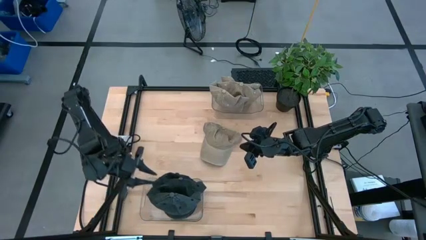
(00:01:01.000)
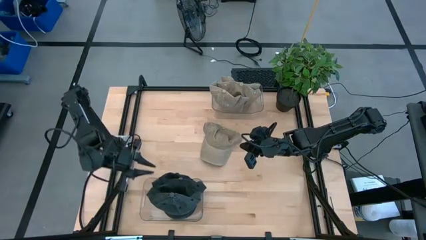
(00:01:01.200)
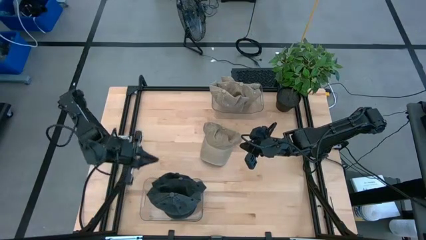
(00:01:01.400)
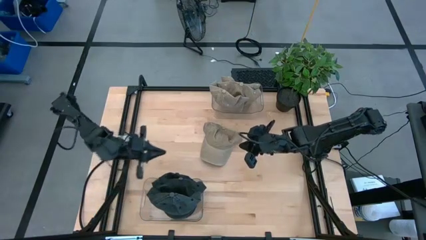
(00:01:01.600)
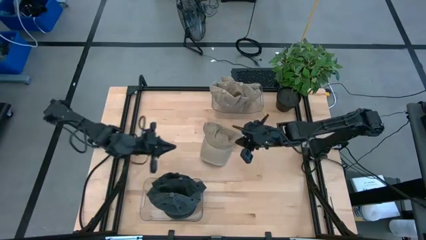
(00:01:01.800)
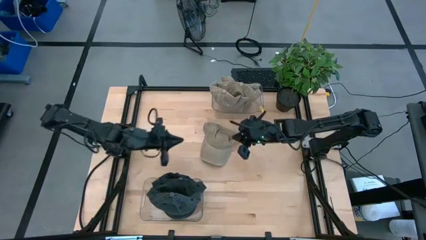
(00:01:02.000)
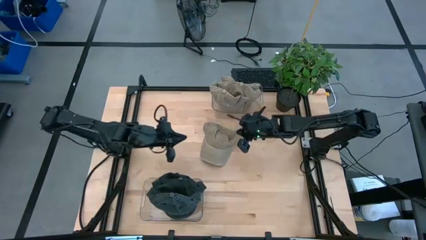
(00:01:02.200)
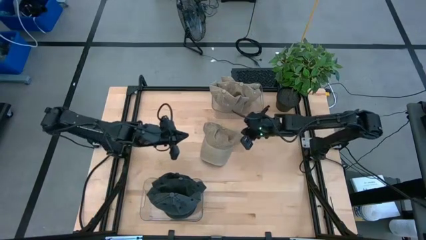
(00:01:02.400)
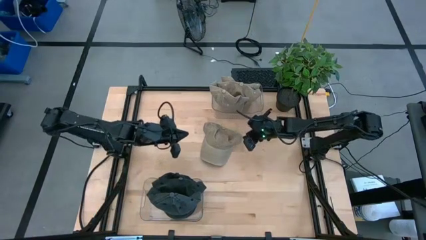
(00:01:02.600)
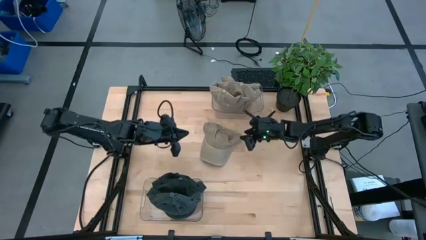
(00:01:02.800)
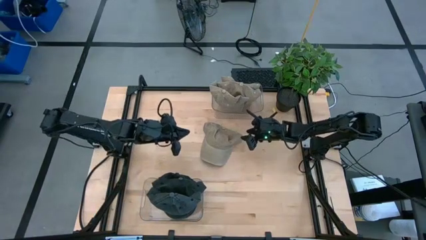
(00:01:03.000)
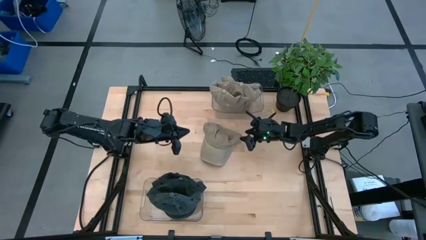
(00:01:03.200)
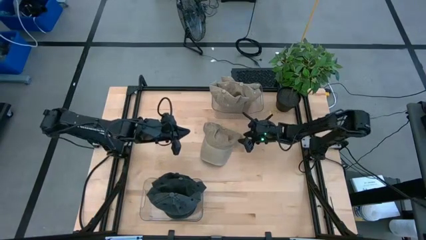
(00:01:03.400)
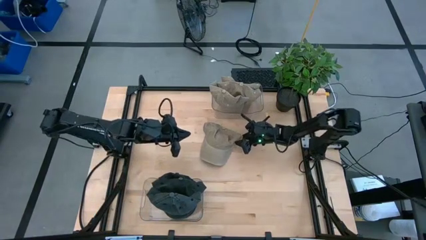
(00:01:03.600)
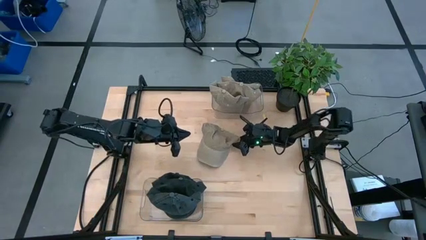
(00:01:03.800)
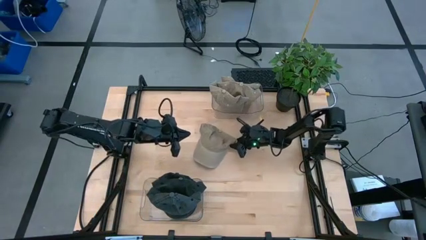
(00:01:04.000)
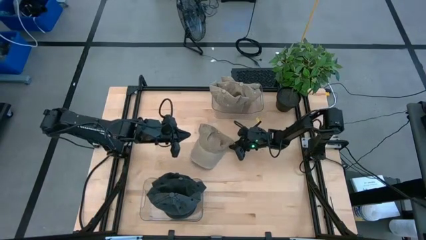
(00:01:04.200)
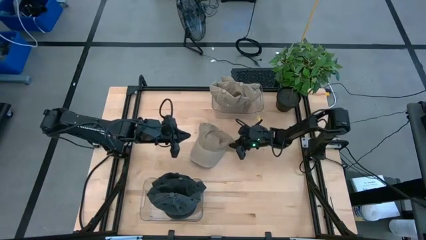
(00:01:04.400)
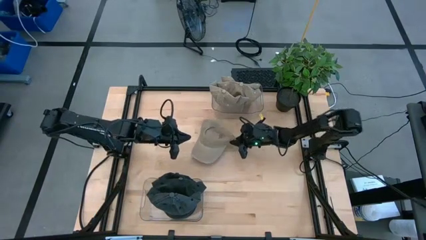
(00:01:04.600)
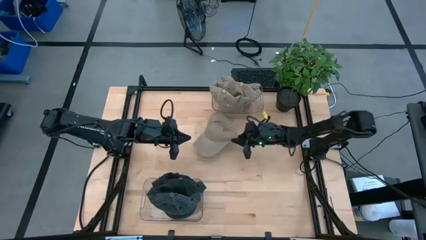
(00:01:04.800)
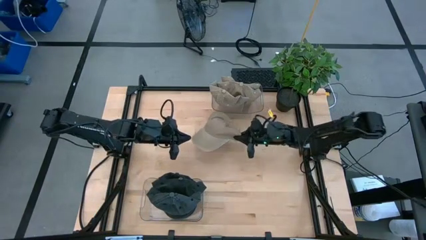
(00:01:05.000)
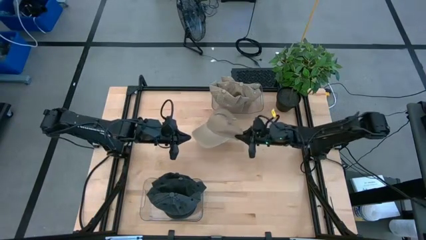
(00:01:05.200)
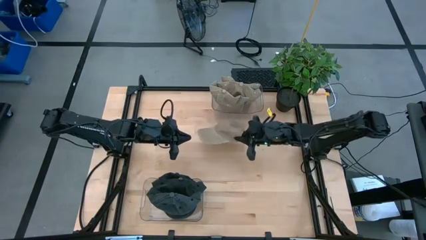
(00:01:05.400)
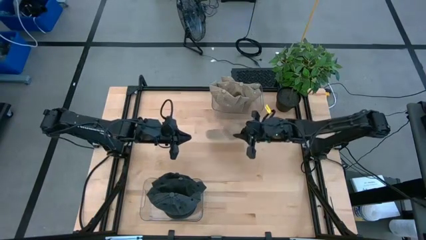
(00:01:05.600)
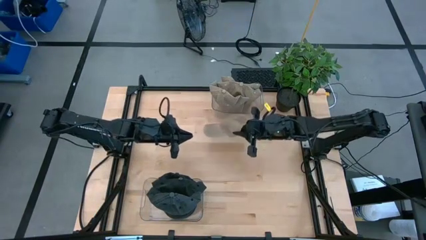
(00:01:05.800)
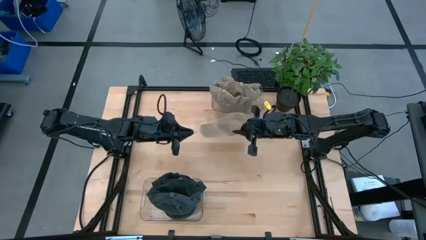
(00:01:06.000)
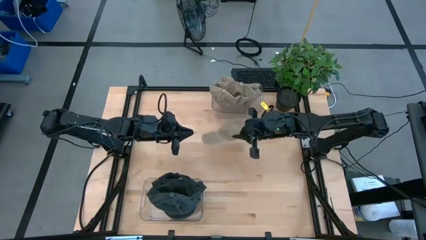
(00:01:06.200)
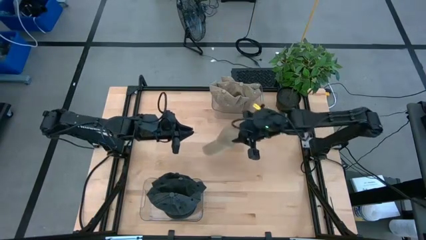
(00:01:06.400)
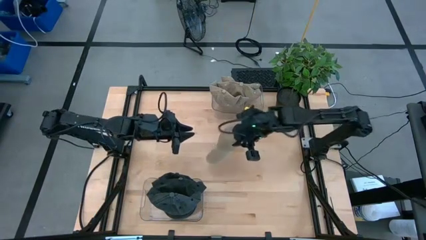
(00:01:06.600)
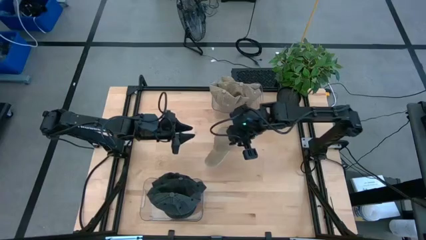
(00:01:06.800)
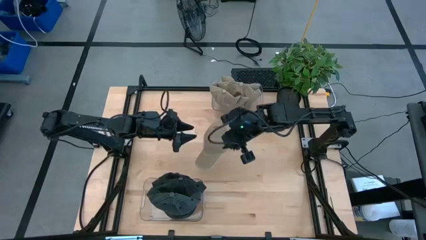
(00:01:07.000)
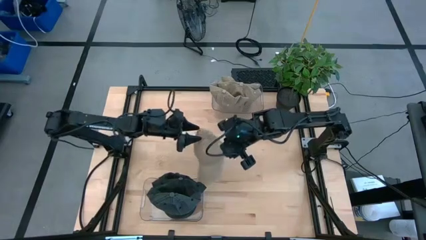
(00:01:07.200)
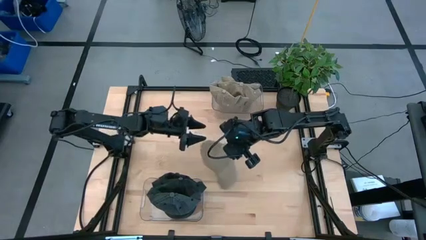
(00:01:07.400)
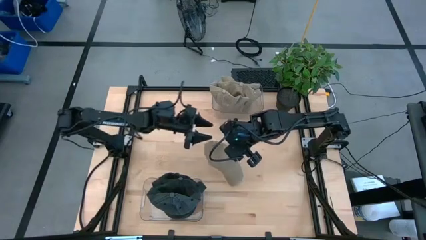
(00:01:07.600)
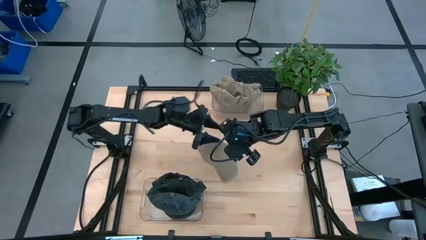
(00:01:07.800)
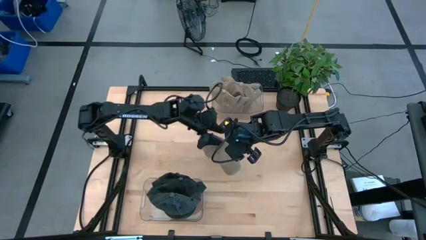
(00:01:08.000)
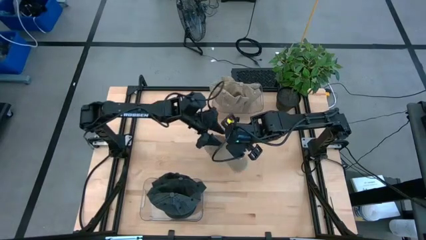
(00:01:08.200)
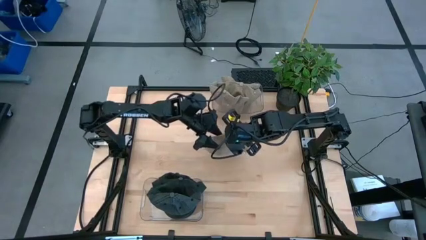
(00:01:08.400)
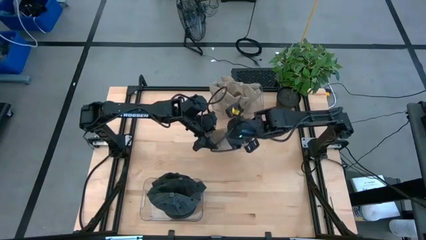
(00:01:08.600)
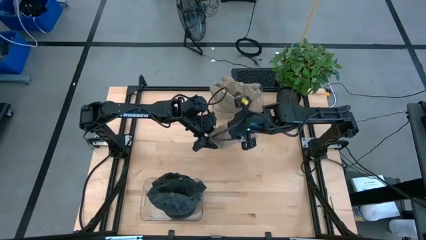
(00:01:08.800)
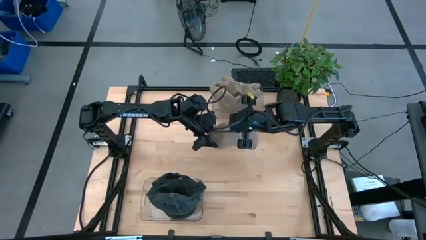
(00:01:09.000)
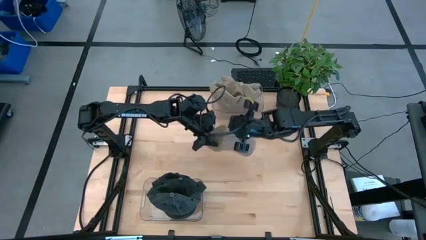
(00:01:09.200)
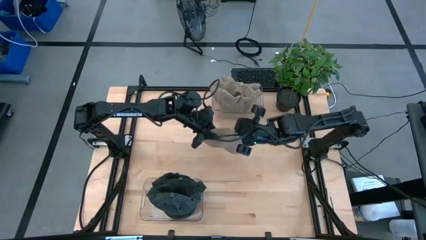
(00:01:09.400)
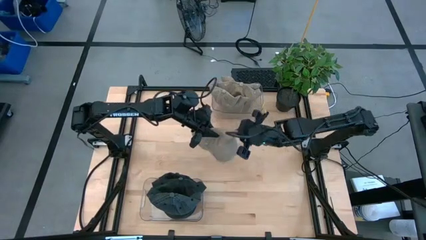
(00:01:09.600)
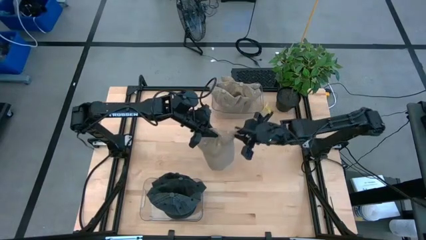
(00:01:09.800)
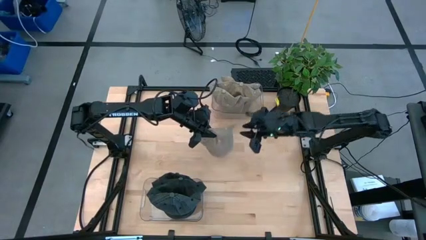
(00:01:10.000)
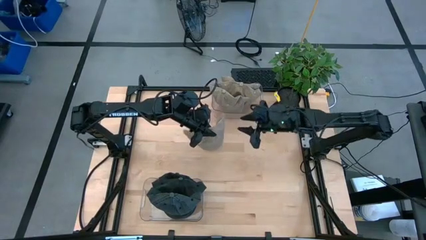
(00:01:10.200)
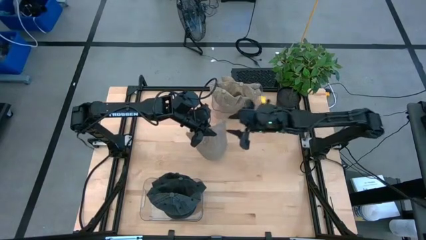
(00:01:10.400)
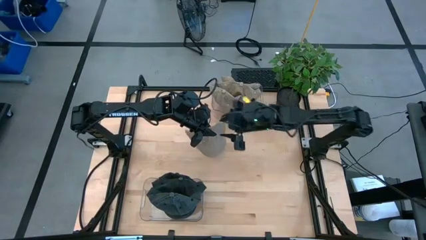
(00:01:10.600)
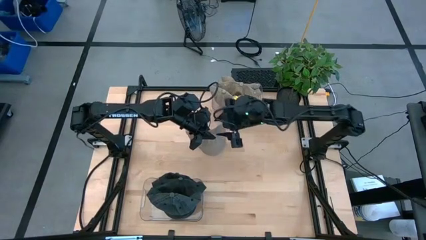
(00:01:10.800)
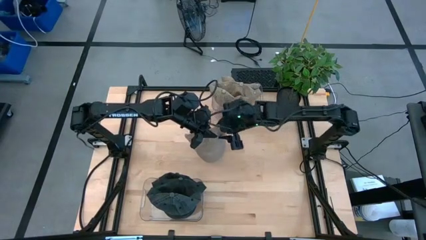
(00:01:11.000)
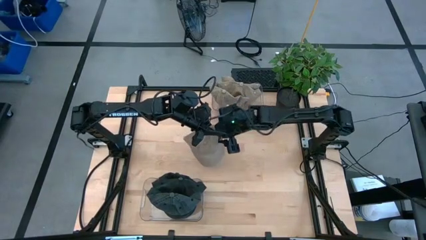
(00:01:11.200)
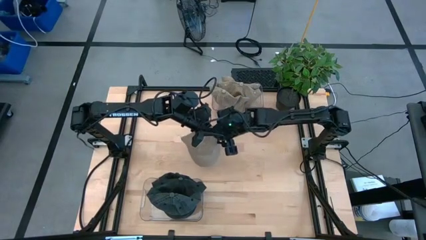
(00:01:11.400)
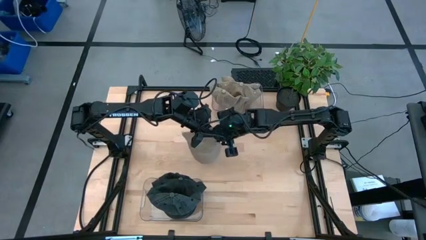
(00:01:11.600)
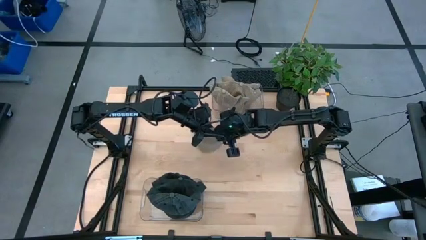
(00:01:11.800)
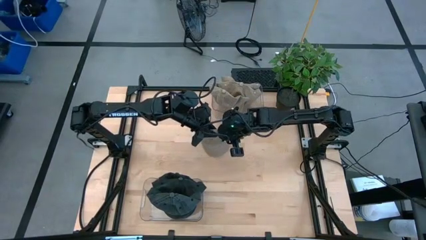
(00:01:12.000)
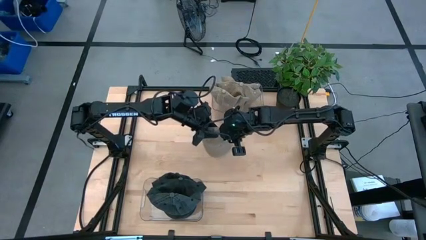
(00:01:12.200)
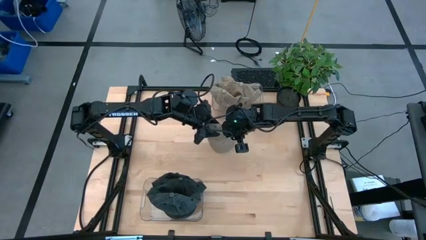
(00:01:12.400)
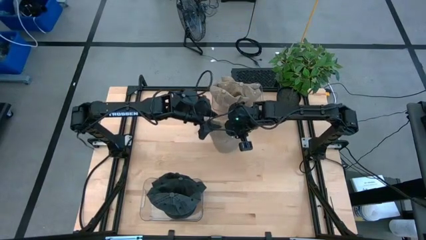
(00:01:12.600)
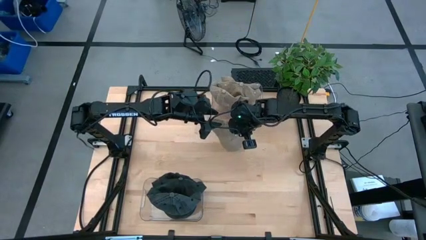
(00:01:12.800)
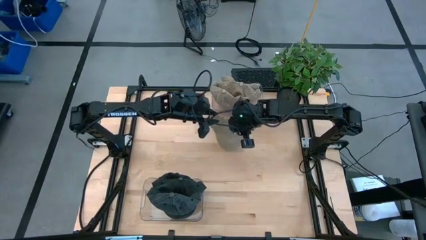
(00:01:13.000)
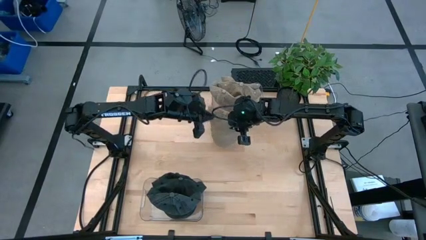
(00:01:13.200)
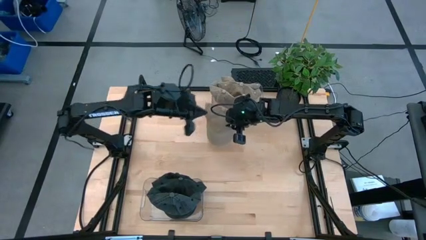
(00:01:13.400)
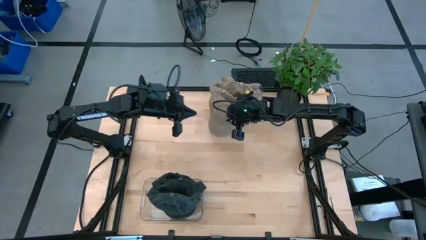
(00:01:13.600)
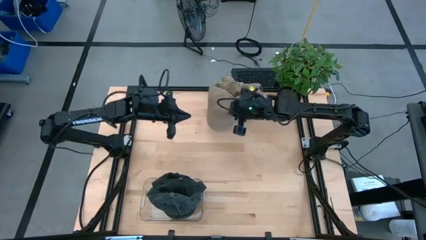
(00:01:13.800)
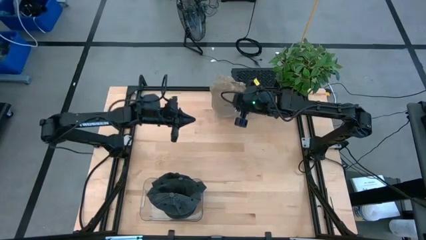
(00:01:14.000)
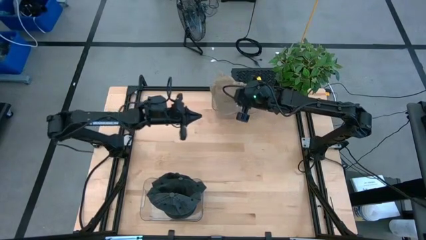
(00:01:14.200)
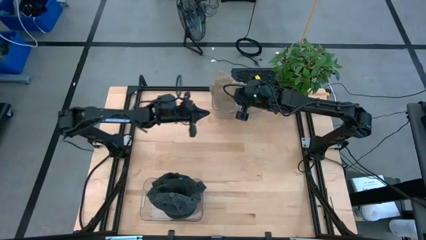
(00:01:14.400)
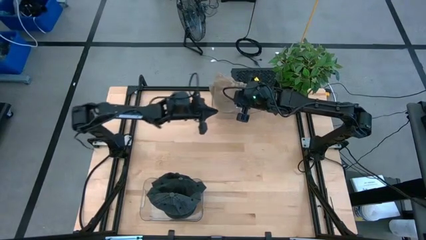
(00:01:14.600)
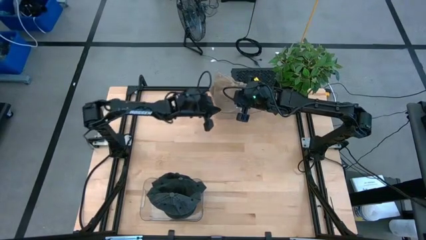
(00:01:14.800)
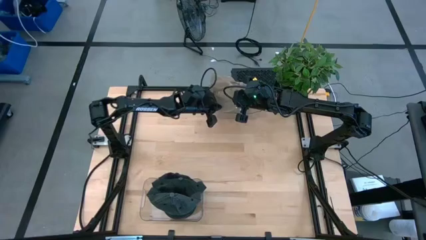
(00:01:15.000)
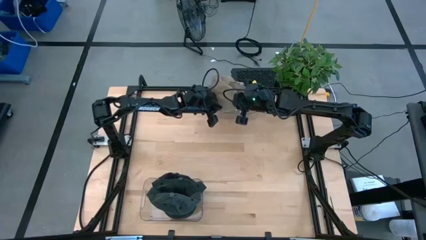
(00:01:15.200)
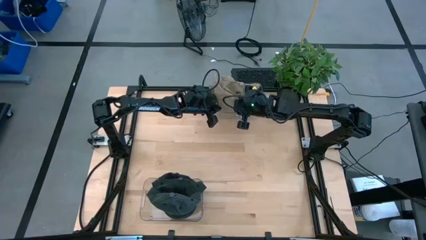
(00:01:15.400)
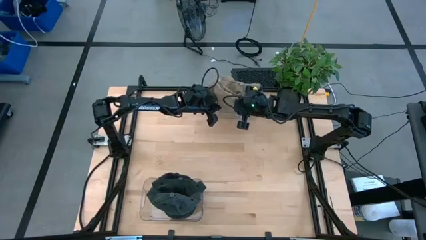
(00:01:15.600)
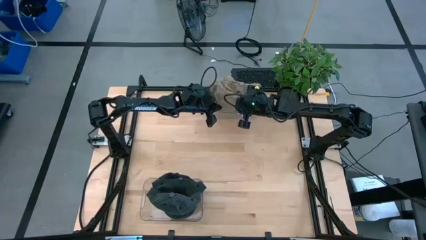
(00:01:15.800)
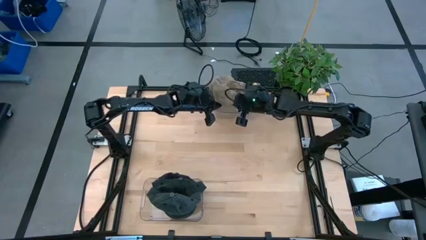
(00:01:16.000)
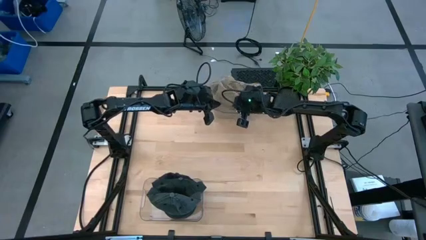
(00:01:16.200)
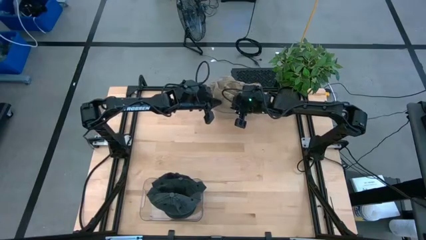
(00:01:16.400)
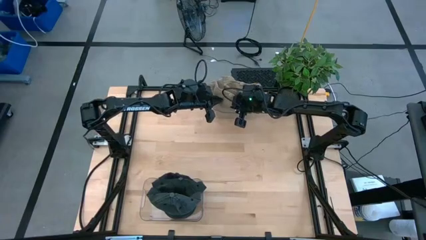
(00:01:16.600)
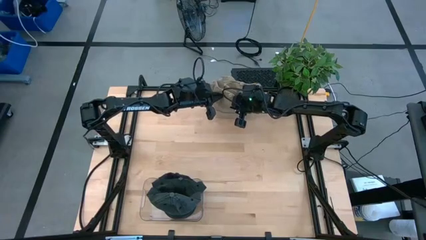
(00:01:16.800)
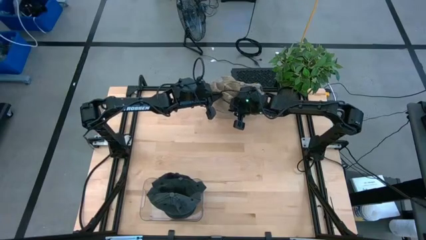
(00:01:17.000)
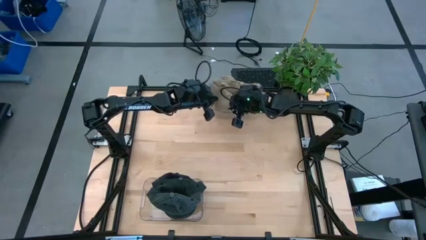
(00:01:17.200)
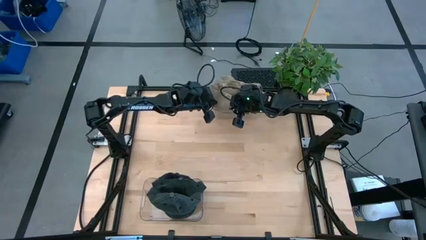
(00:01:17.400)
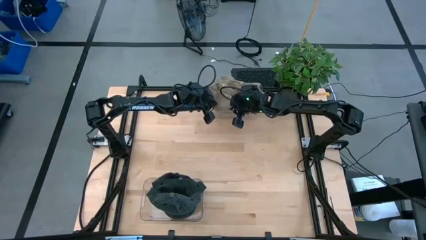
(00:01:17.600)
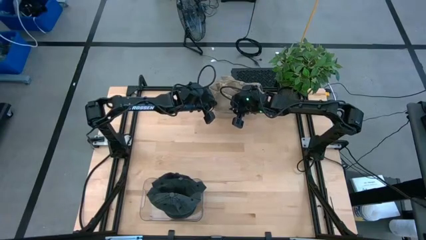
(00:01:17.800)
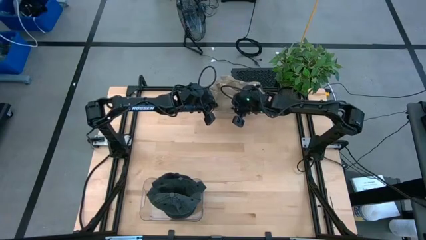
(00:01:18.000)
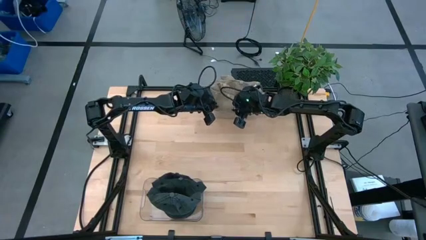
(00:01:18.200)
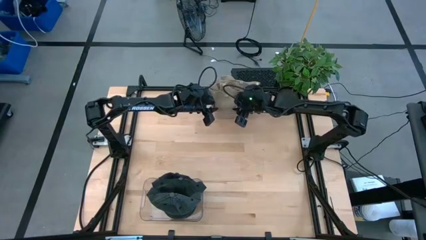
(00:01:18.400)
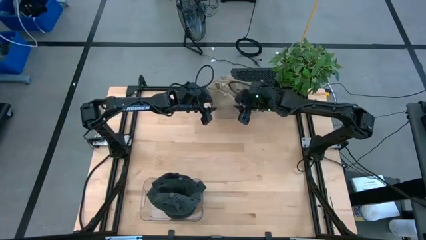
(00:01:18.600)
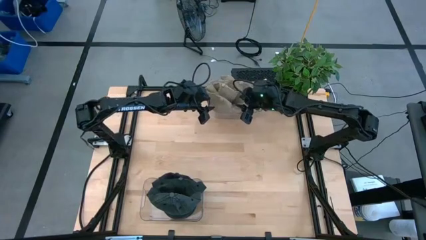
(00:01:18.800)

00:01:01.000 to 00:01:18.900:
Task: Pick & Place hat
Put the brown cap into the top transparent bin
